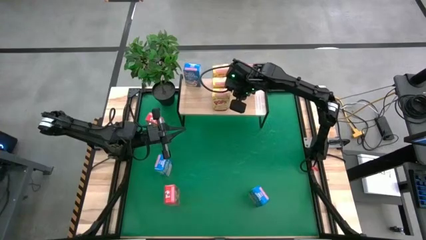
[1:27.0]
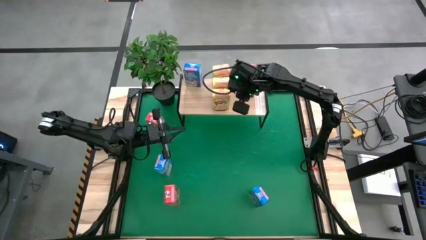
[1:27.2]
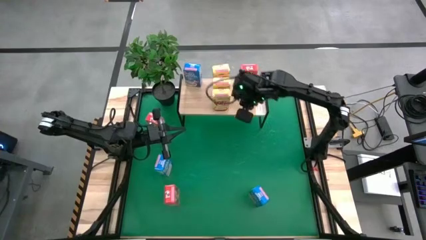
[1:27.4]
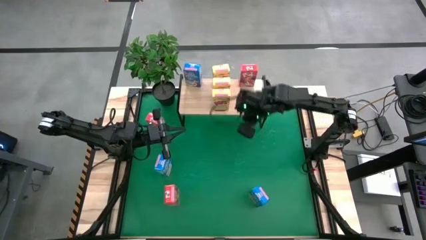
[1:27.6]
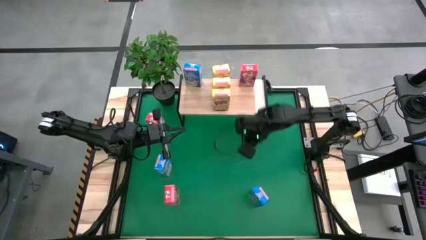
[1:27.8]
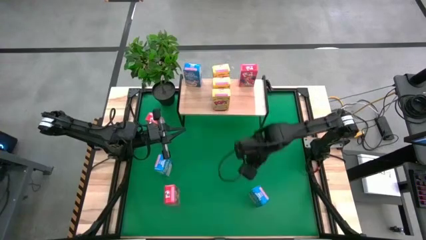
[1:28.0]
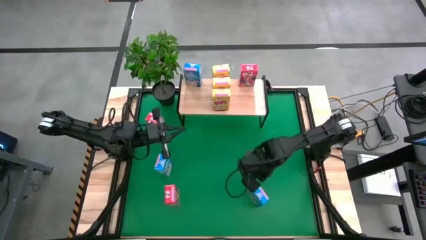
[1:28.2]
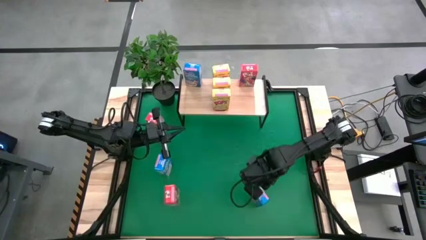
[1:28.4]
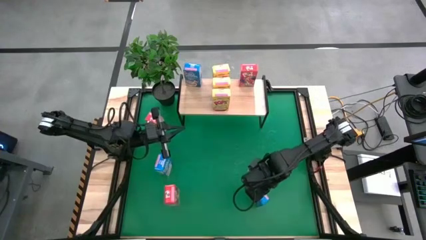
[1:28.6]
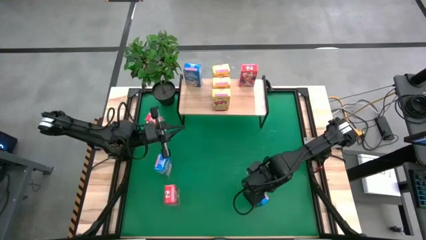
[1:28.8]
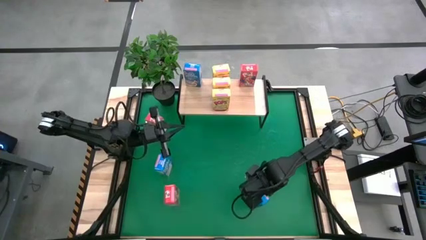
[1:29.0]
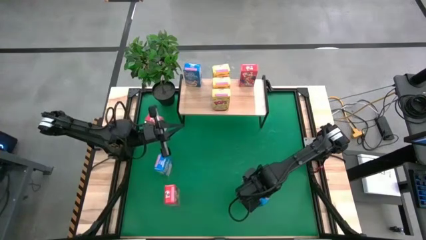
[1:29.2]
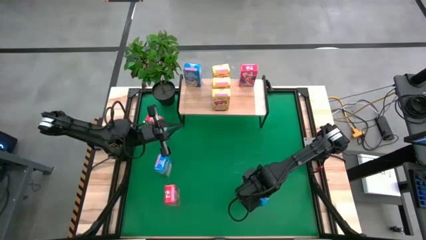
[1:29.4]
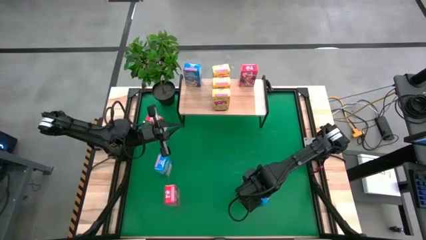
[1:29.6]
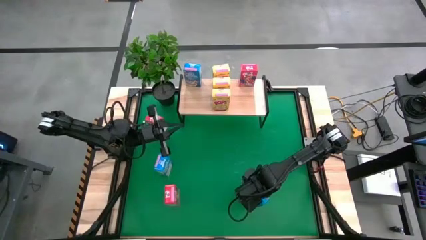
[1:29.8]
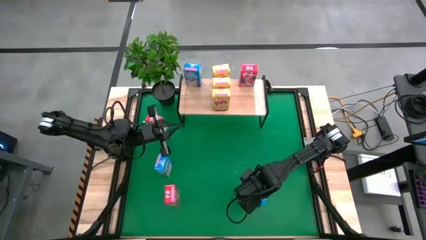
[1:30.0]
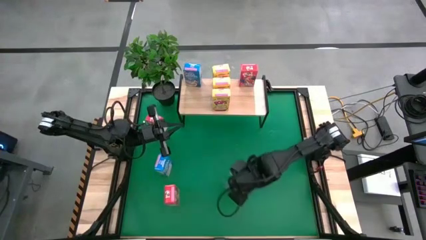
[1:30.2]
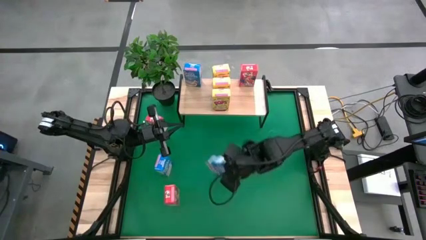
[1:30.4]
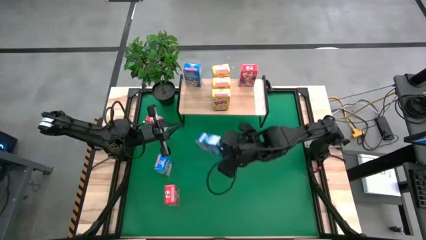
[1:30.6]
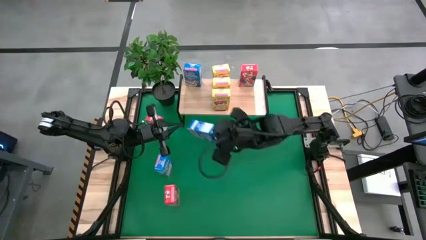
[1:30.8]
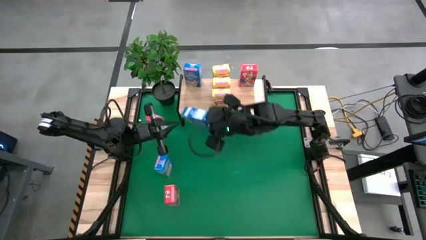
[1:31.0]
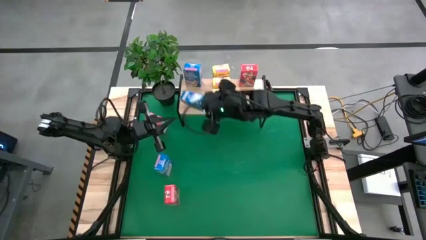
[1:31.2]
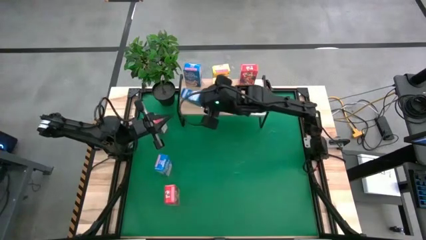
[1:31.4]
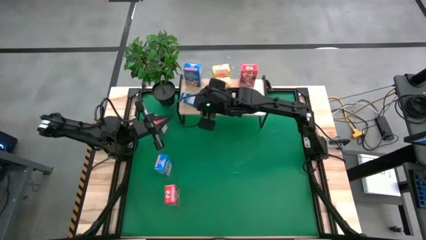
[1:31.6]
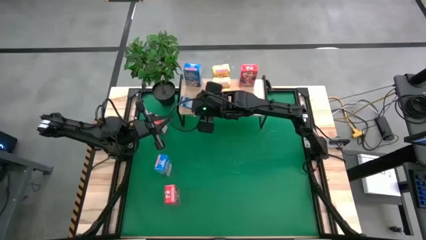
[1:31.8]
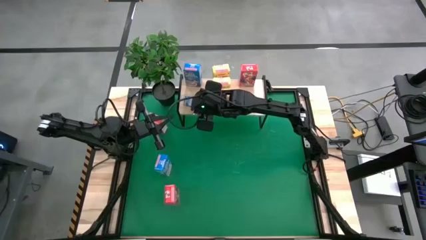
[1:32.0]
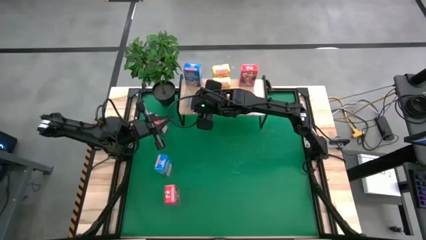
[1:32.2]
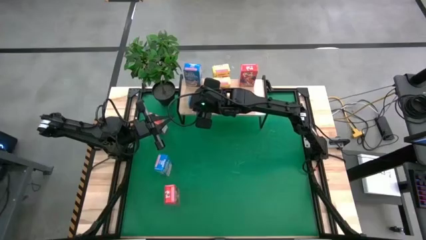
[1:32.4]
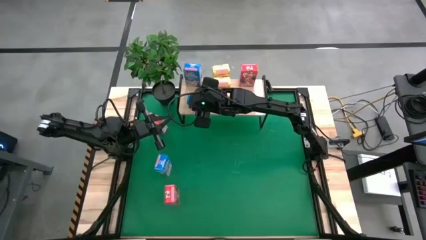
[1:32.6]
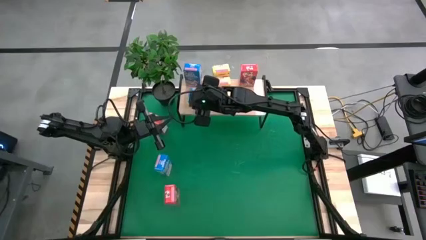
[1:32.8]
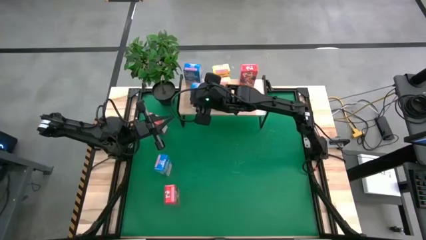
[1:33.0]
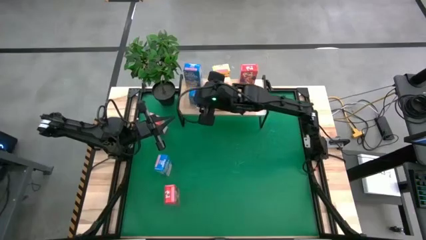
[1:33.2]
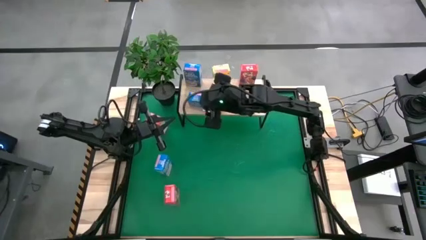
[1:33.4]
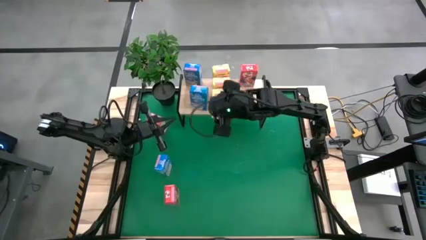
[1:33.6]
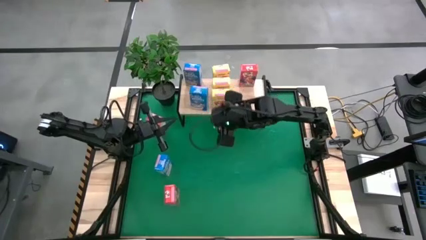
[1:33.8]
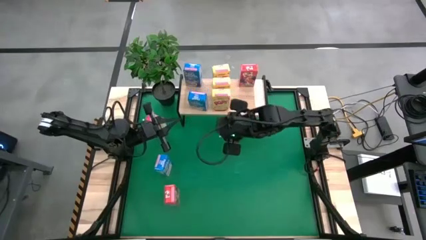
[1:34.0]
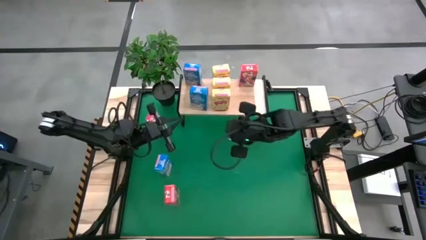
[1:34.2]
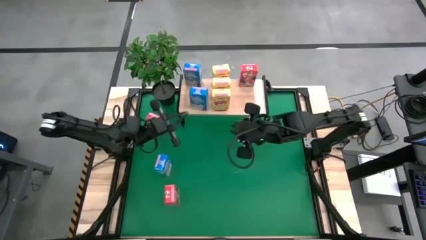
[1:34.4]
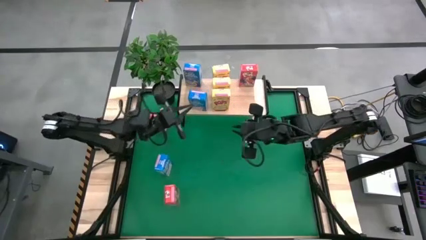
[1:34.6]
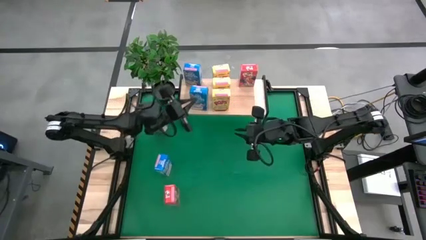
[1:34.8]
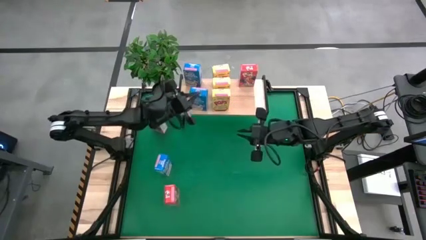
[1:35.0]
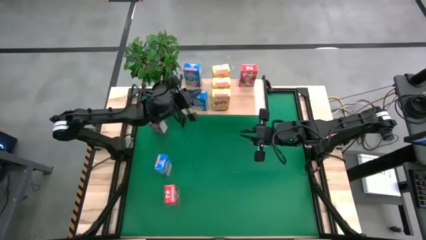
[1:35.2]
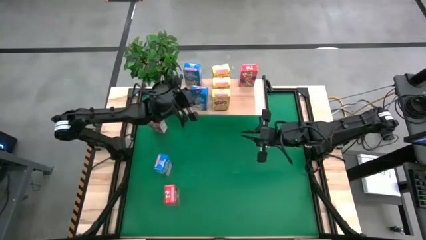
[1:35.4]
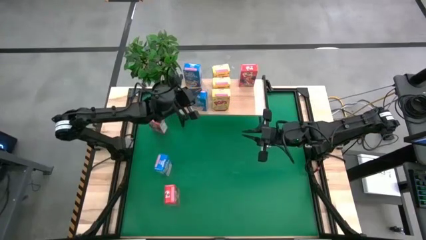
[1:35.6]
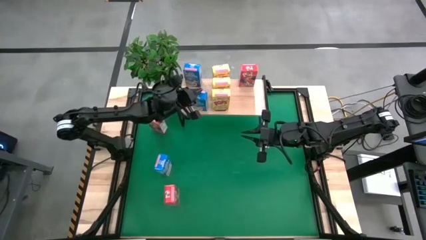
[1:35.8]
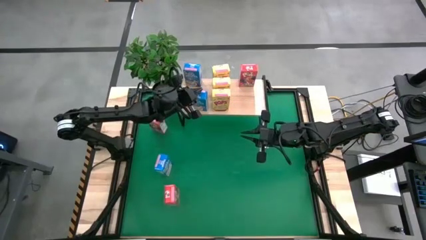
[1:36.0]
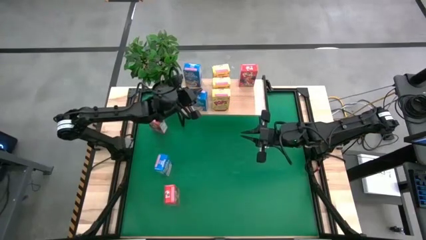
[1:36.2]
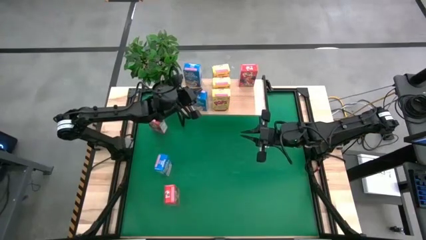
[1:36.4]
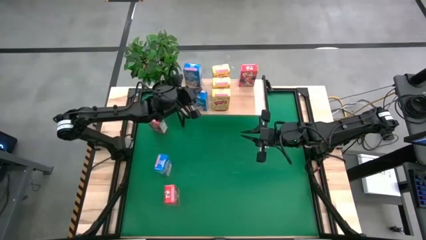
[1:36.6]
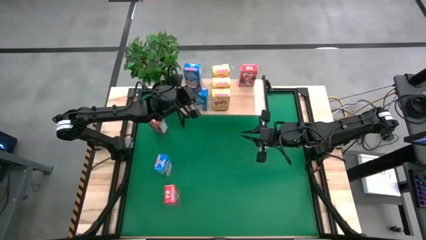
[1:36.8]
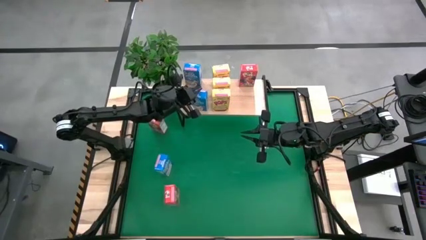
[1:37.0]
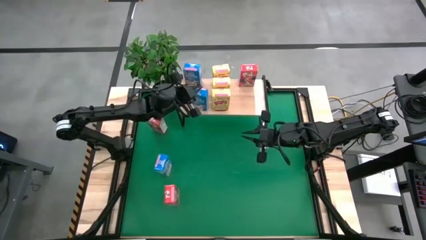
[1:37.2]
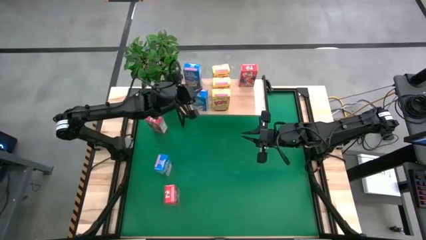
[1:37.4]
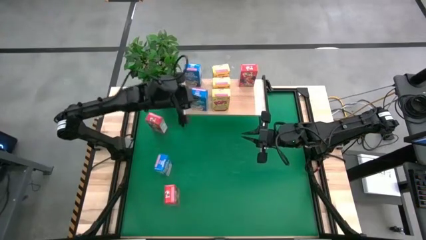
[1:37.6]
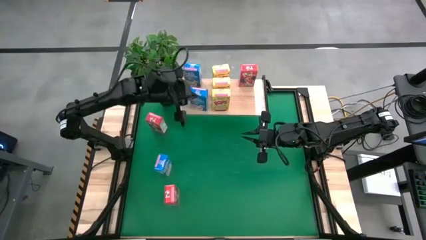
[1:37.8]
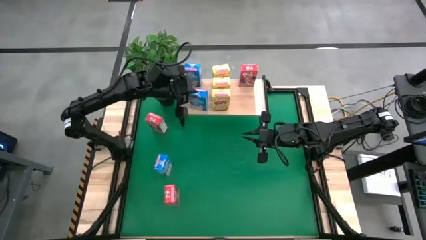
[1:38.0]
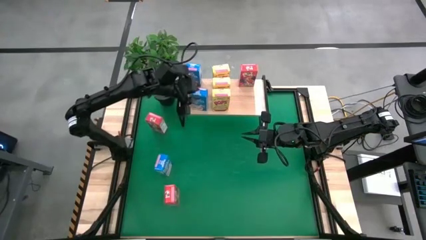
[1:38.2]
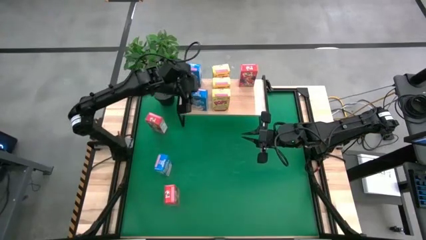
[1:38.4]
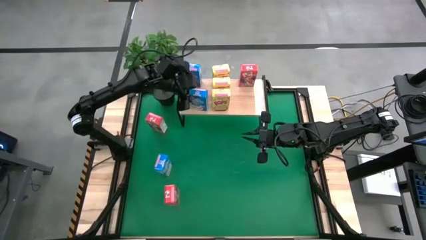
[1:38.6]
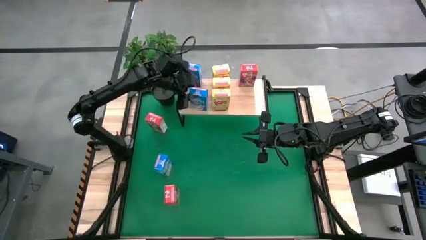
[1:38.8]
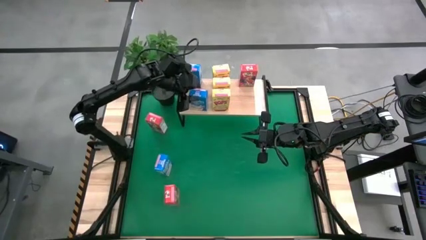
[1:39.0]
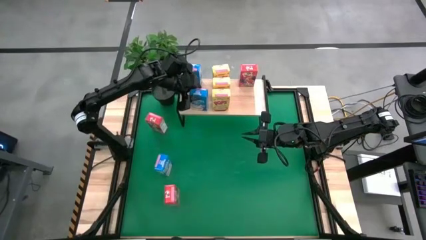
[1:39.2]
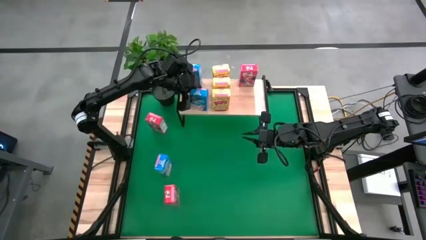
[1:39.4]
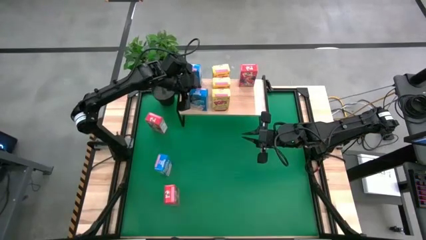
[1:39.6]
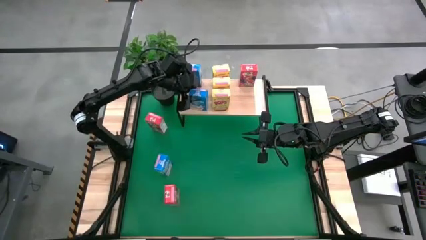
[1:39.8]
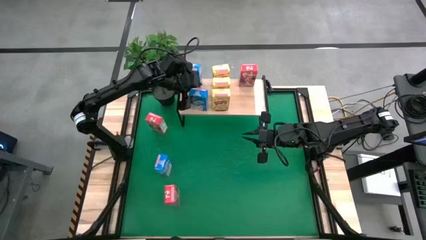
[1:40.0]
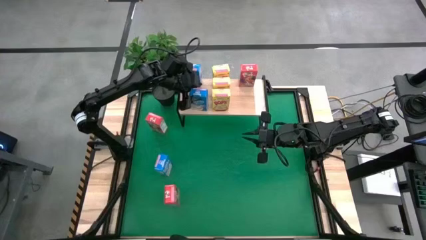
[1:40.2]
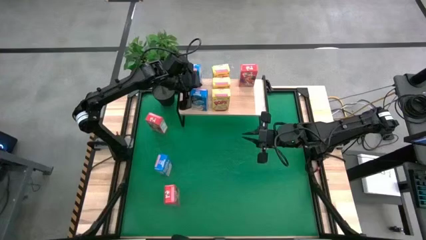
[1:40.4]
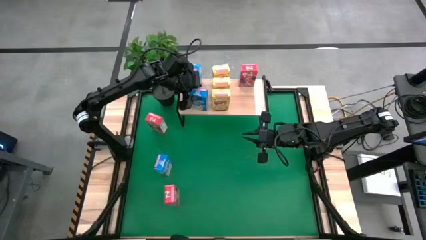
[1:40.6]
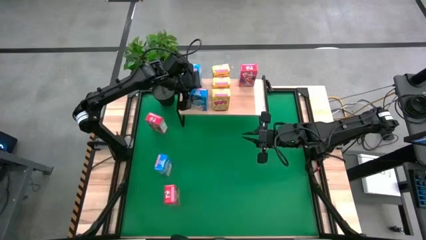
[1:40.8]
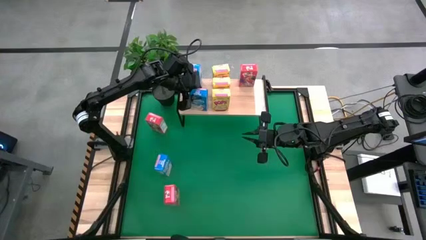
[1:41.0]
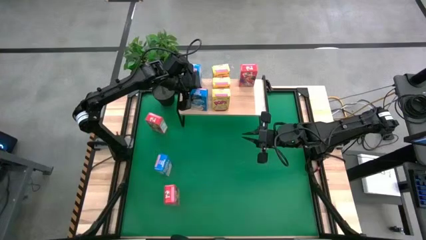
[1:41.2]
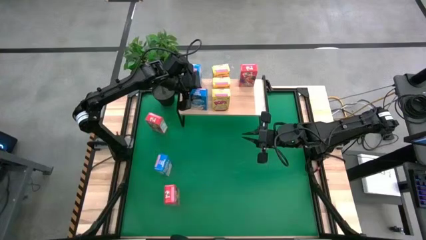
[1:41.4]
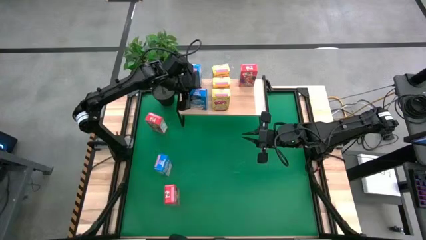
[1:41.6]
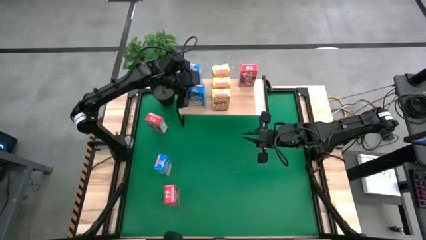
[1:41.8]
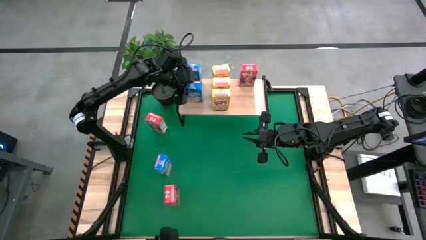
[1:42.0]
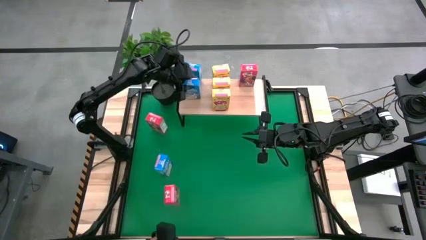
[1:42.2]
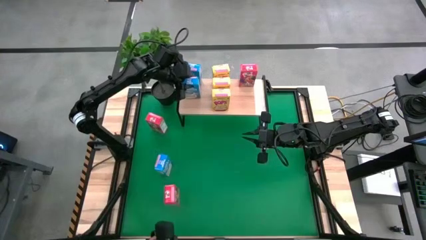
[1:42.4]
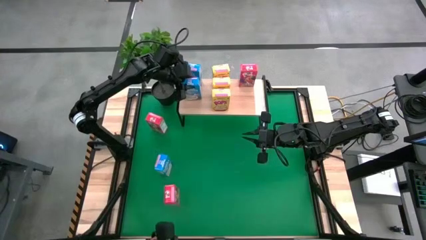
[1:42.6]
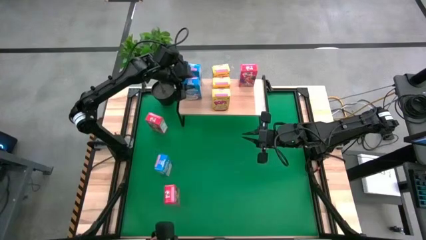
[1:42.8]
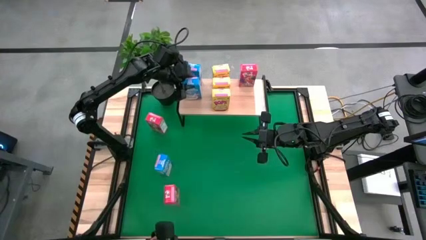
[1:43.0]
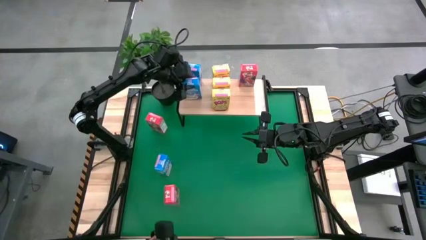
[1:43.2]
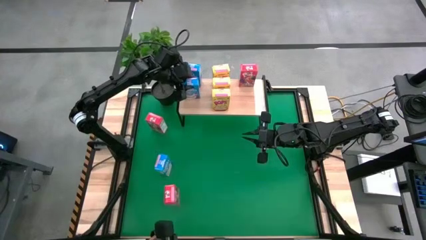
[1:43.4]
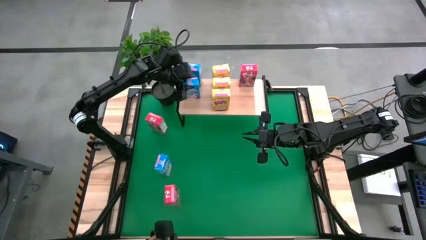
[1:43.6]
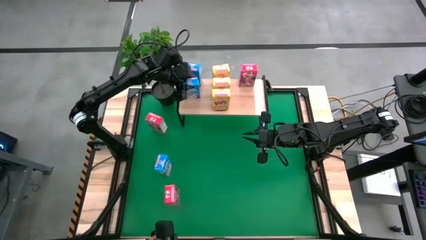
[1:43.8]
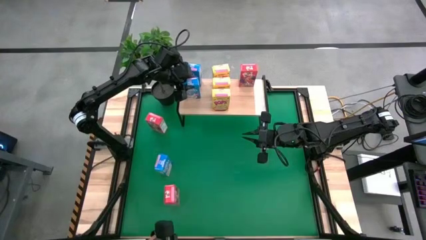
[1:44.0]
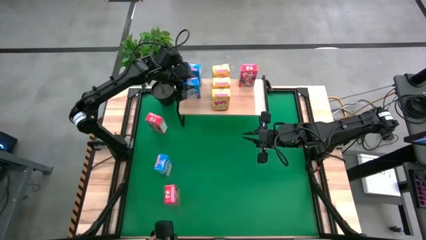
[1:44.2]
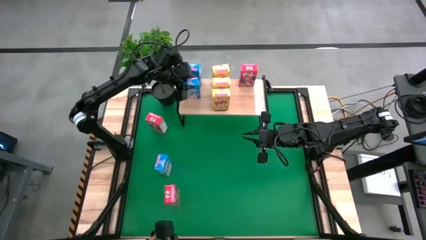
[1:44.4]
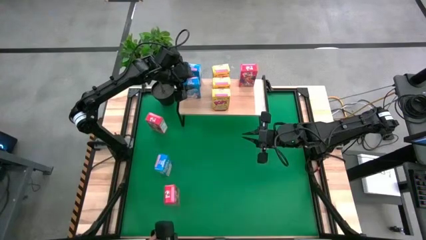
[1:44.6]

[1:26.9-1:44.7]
Task: Stack cereal on shelf
Put the right blue cereal box on the shelf
